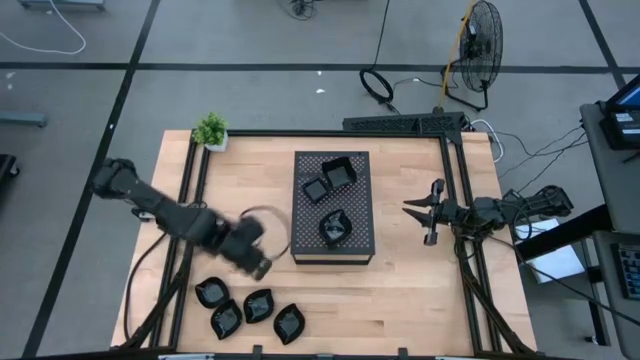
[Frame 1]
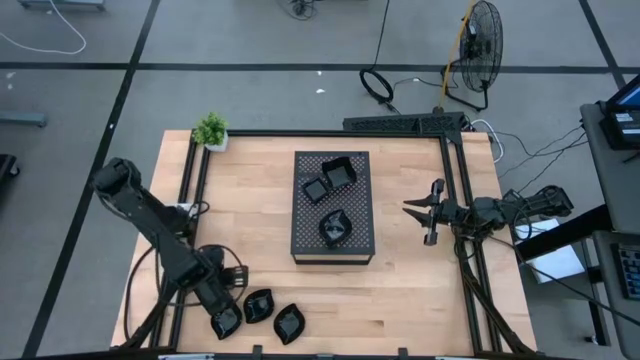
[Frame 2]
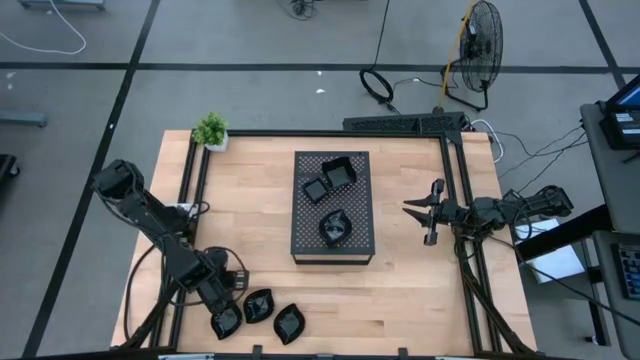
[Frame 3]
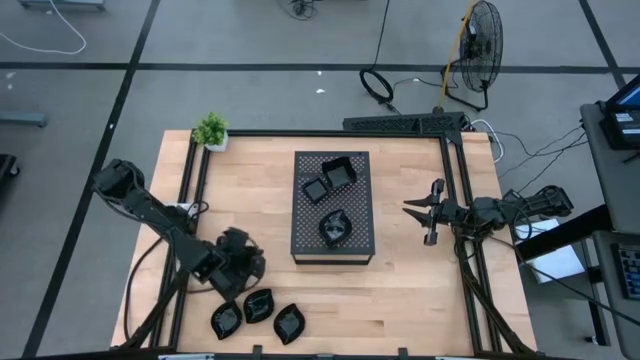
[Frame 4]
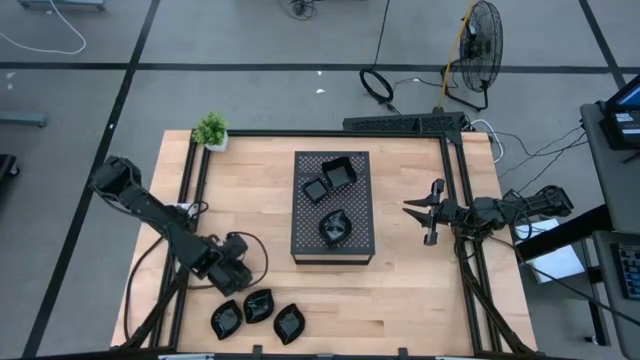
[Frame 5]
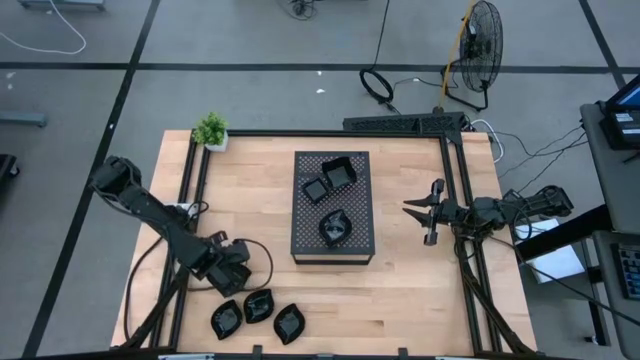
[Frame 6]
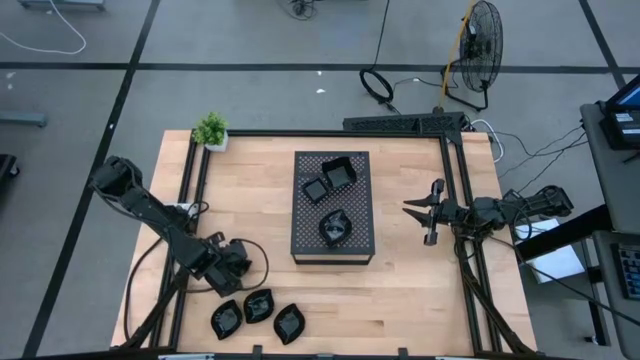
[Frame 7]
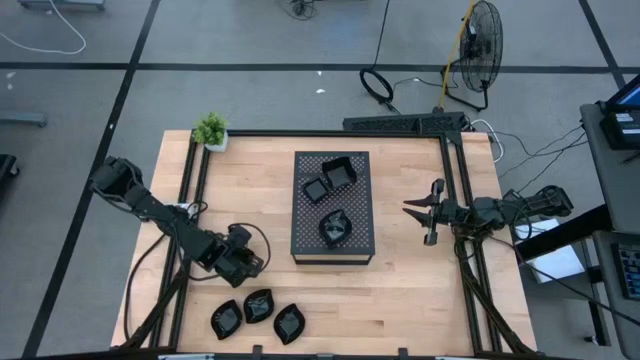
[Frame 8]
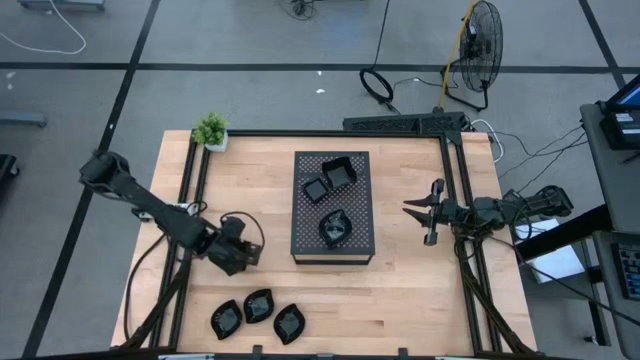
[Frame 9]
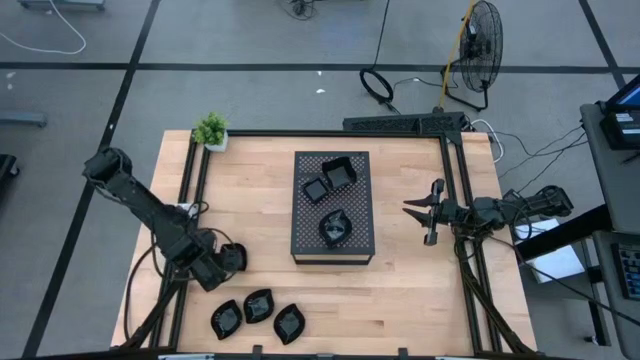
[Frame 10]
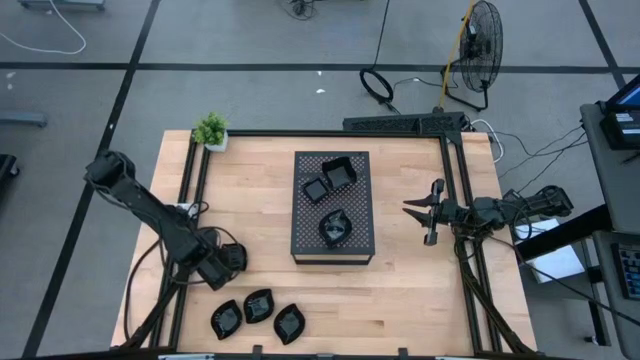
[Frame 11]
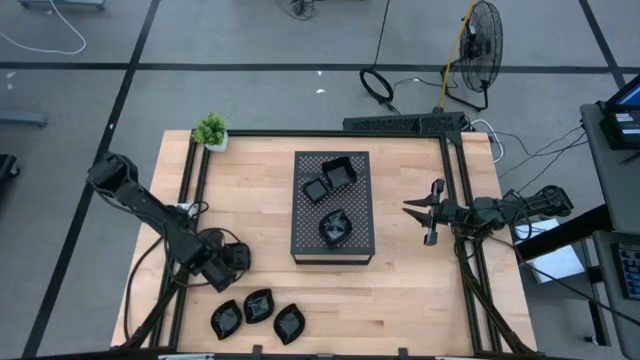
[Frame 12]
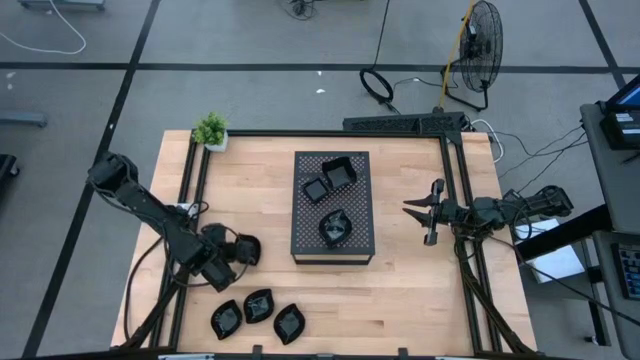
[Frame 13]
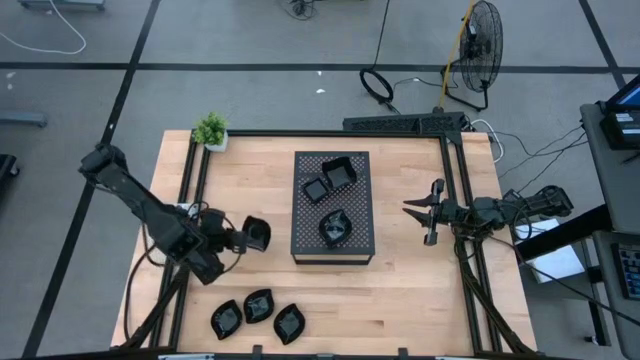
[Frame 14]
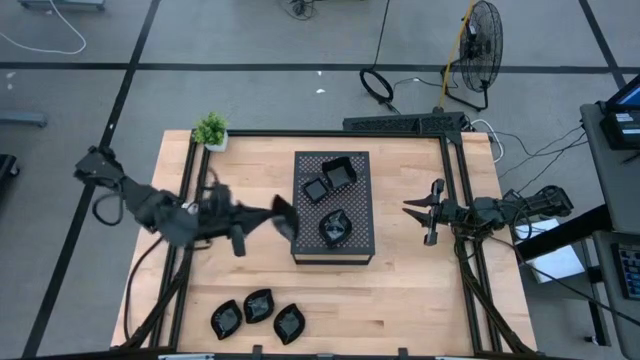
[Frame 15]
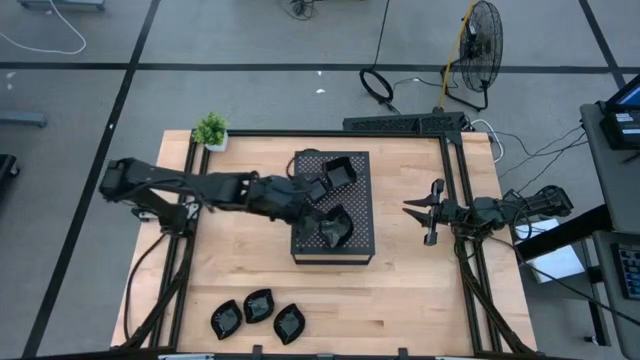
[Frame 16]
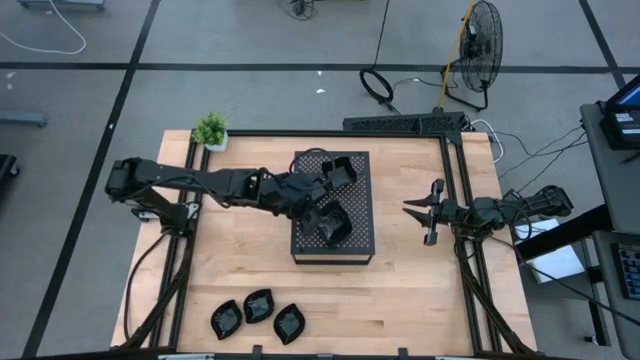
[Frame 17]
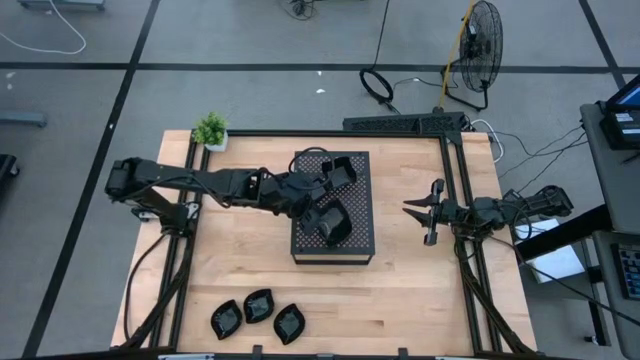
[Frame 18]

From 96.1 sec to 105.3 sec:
Task: Pick & Place Mini shaped plates
Stack the black leaf shaped plate on top of the black leaf shaped plate on the shelf

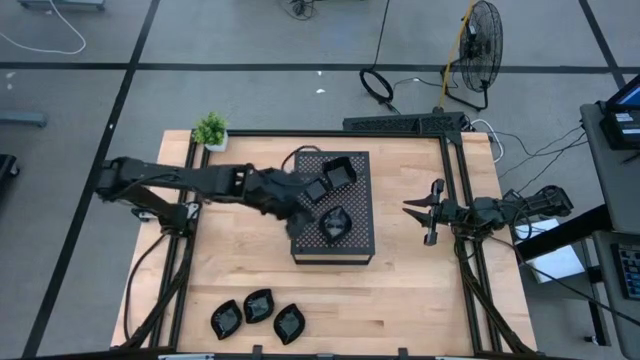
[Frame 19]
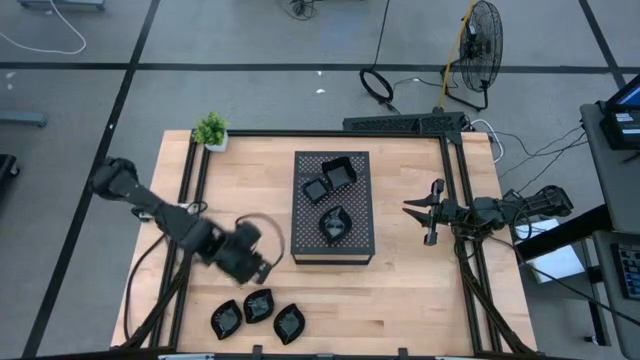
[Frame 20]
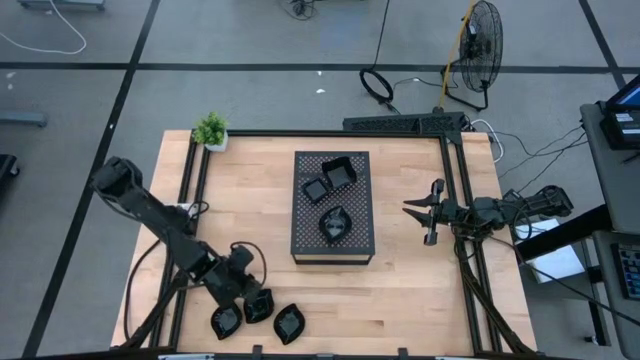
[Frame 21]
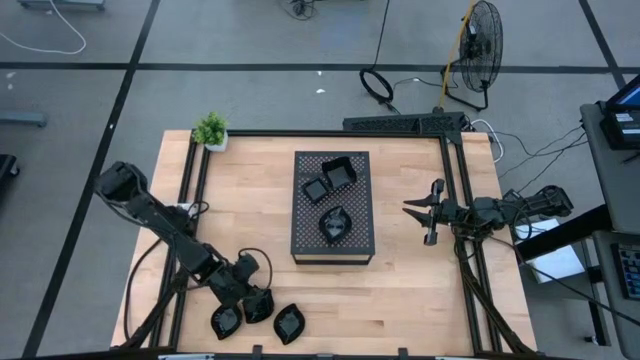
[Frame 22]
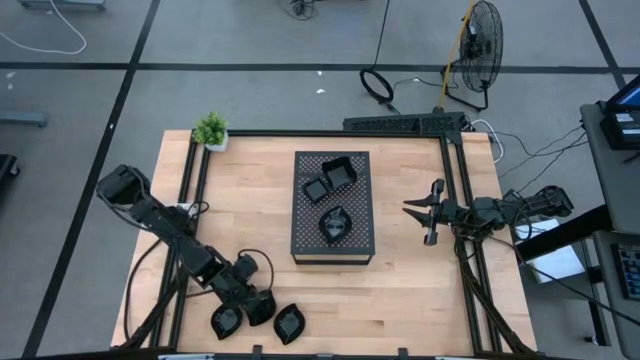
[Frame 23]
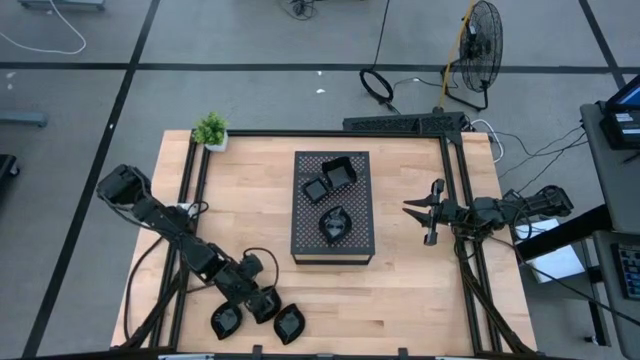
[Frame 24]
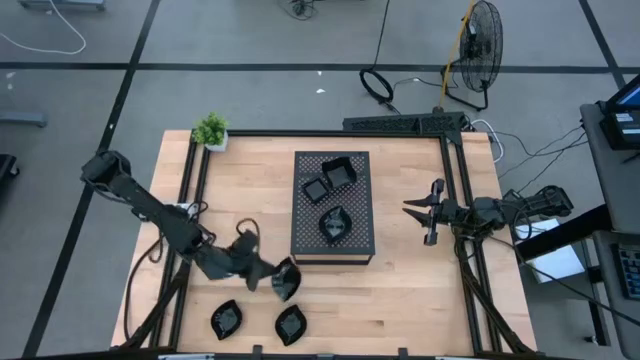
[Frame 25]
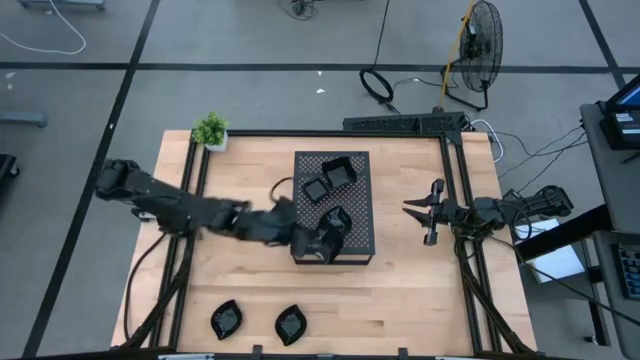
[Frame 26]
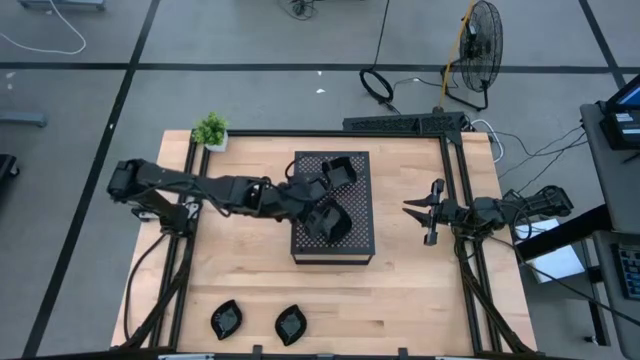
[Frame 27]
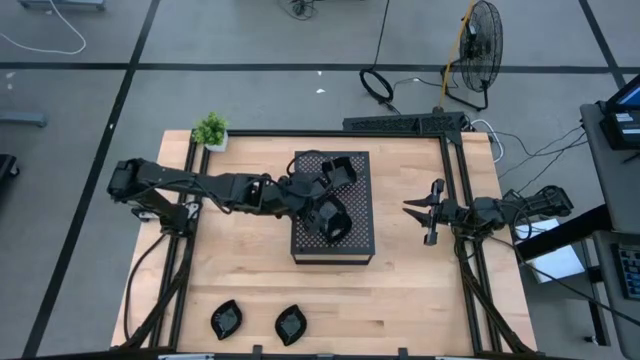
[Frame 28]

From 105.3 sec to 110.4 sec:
Stack the black leaf shaped plate on top of the black leaf shaped plates on the shelf

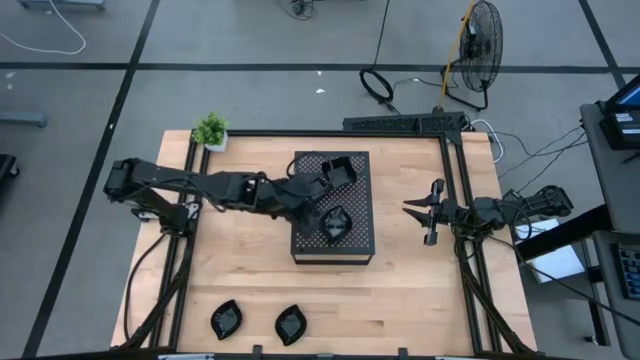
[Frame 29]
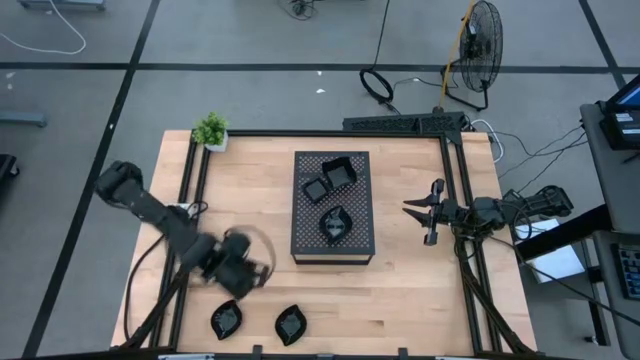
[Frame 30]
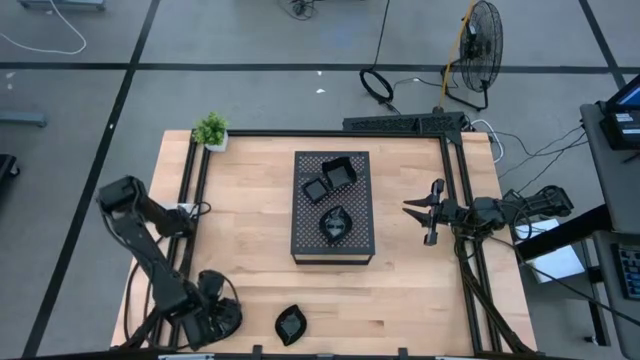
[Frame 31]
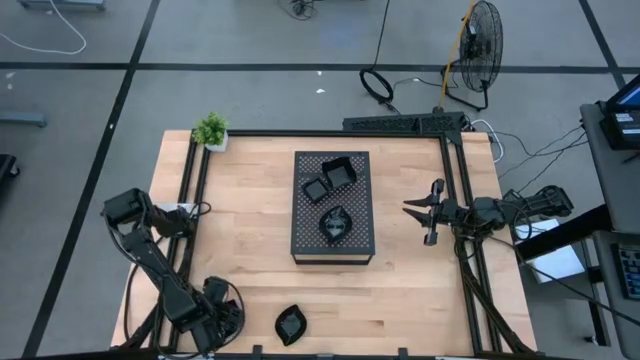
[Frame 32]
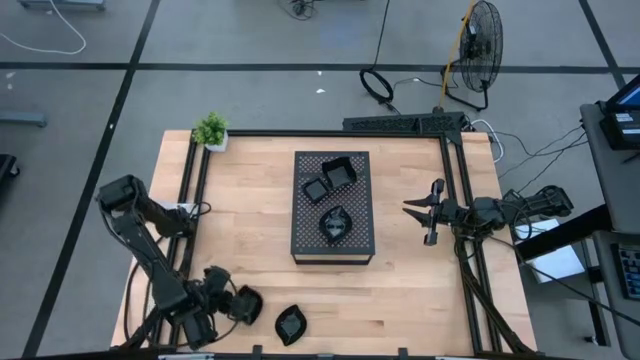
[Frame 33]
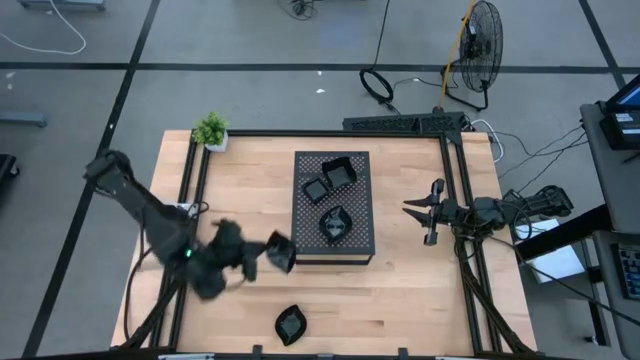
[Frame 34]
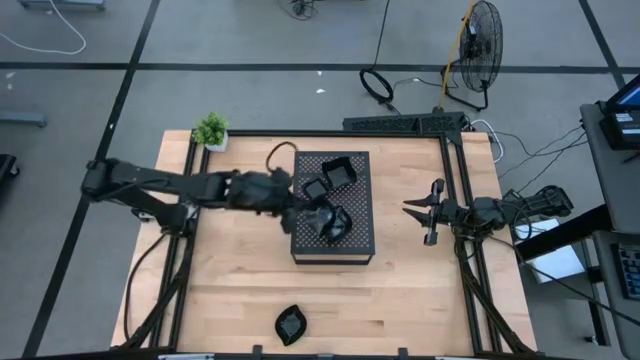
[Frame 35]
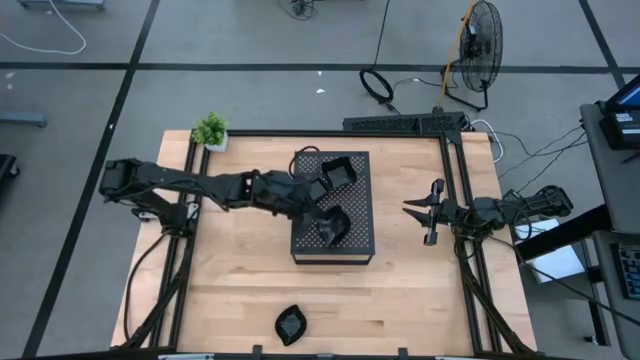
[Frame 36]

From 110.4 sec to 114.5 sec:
Stack the black leaf shaped plate on top of the black leaf shaped plates on the shelf

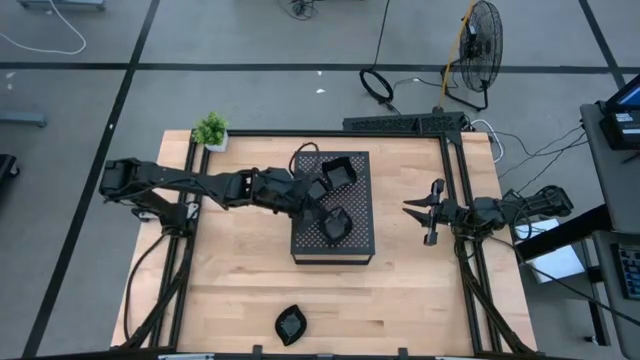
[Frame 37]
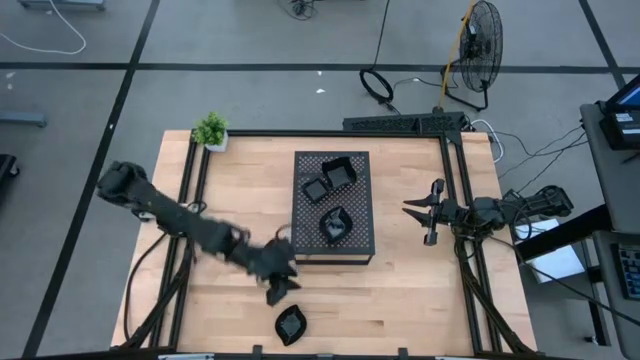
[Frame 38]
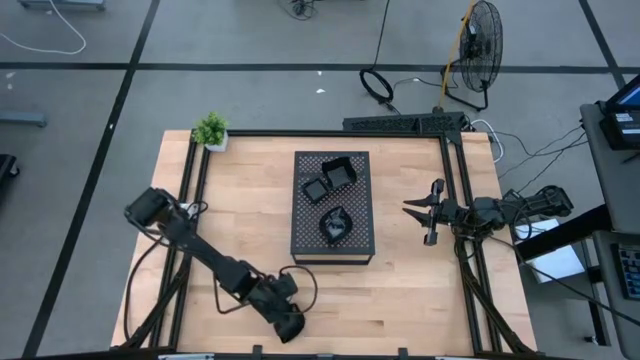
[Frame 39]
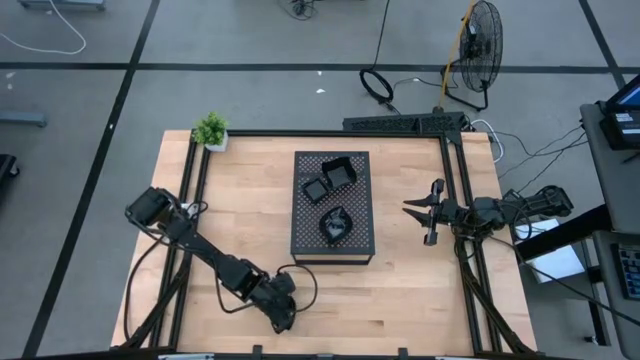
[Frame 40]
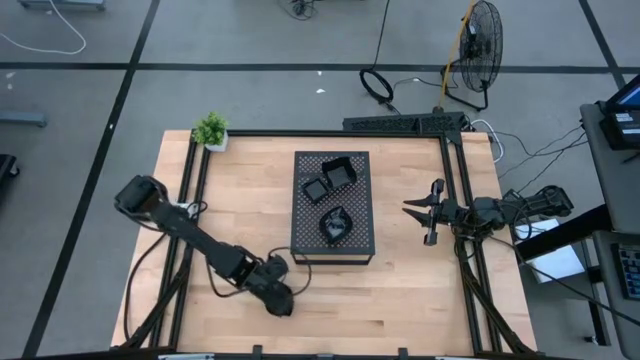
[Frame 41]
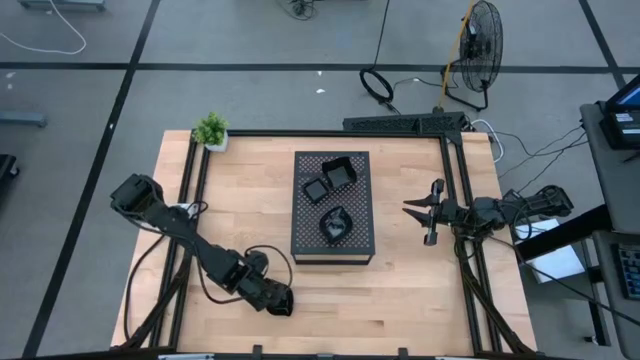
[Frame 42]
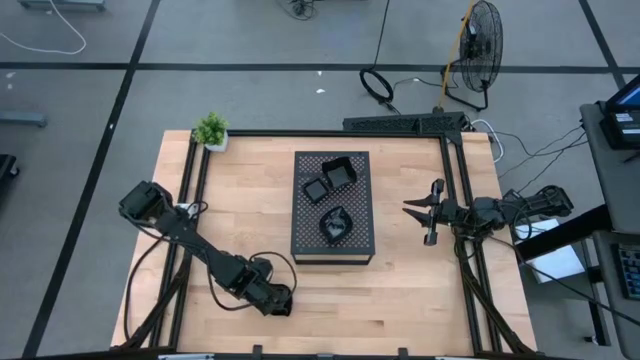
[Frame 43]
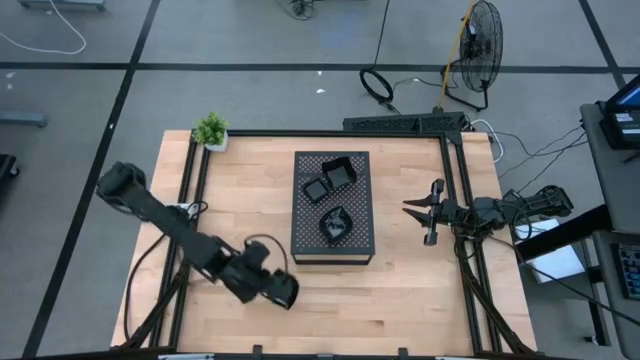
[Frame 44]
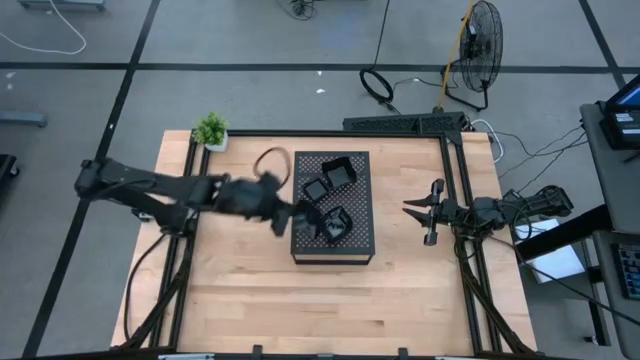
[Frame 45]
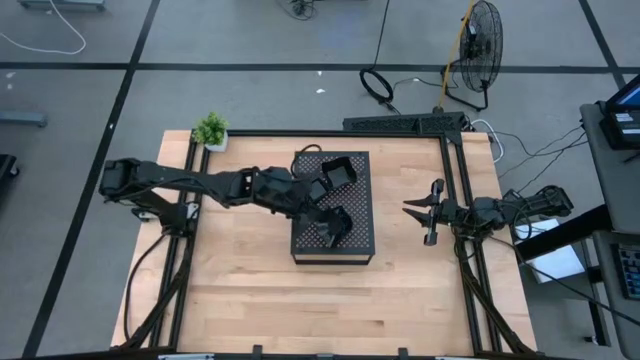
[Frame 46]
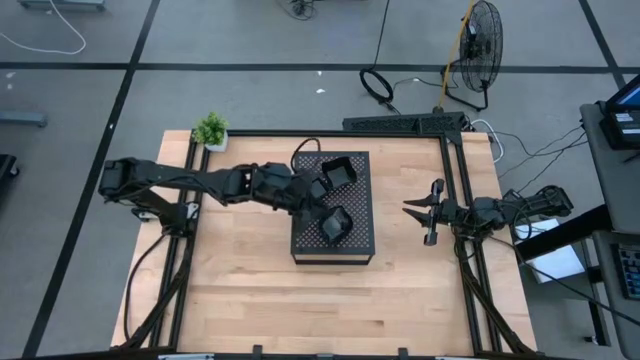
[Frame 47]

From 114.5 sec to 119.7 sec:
Stack the black leaf shaped plate on top of the black leaf shaped plates on the shelf
